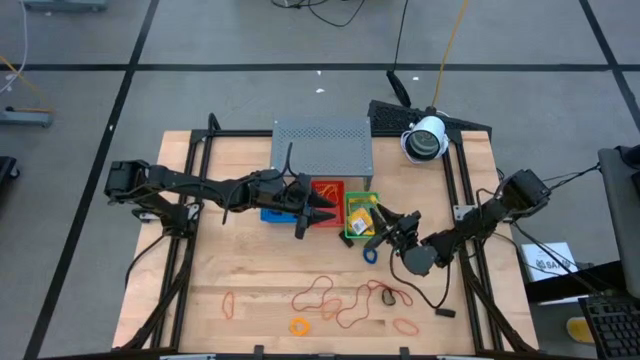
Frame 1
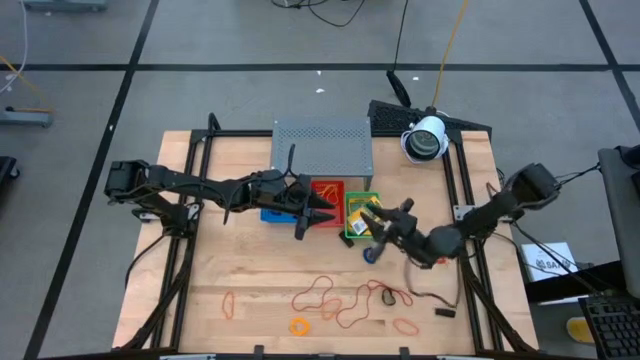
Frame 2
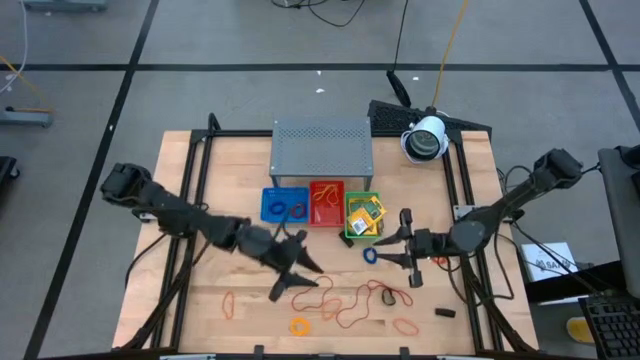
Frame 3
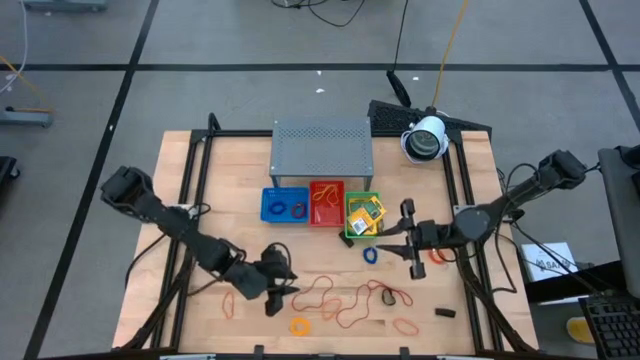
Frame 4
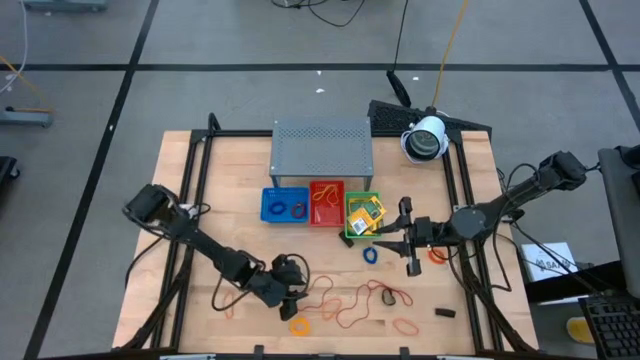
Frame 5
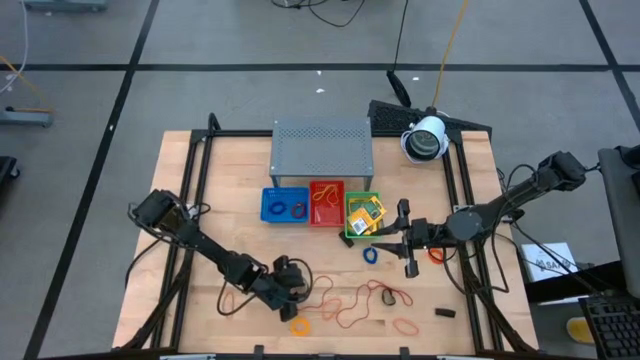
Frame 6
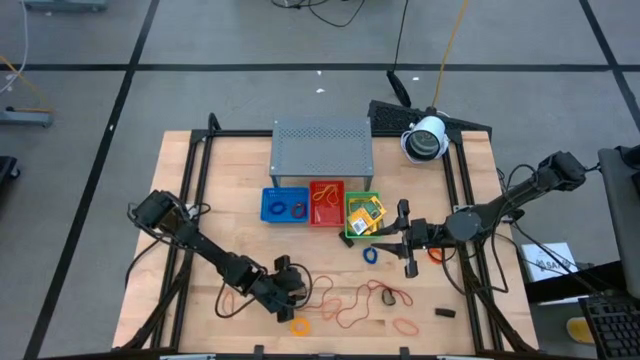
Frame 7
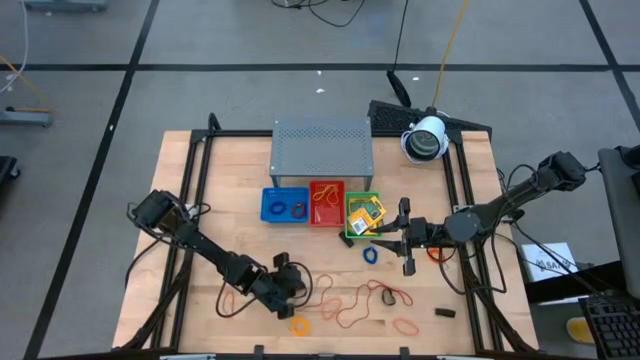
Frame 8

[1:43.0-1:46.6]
Task: Pick & Place Office Desk Supplies
Put the red rubber band into the red bin

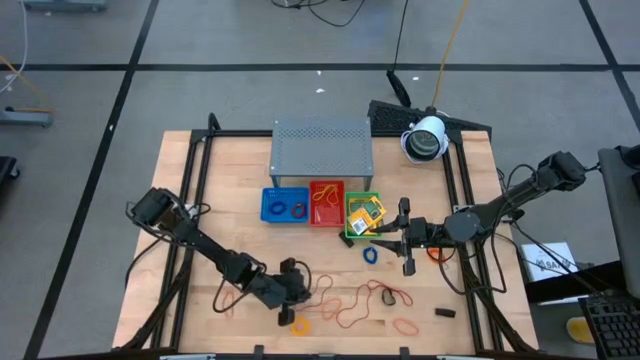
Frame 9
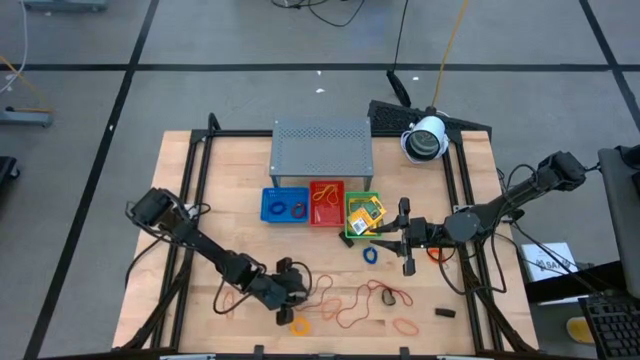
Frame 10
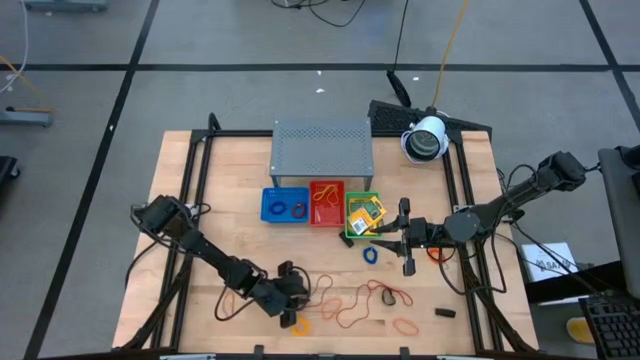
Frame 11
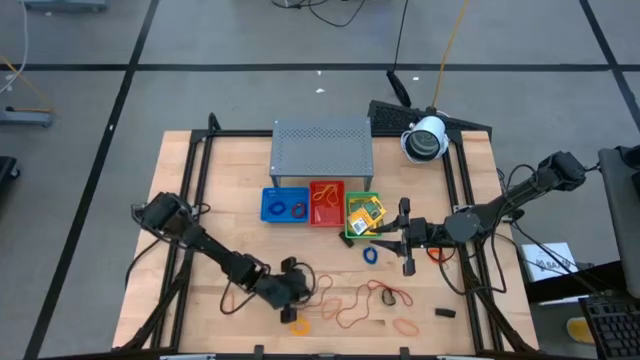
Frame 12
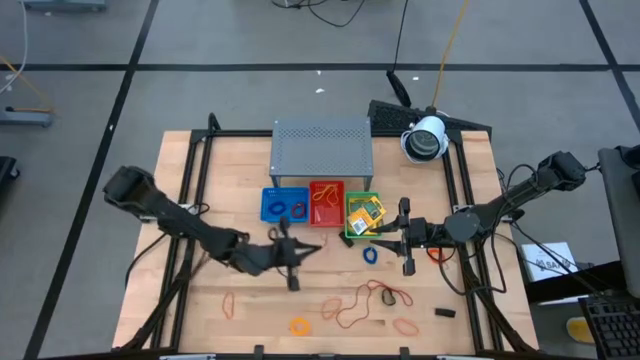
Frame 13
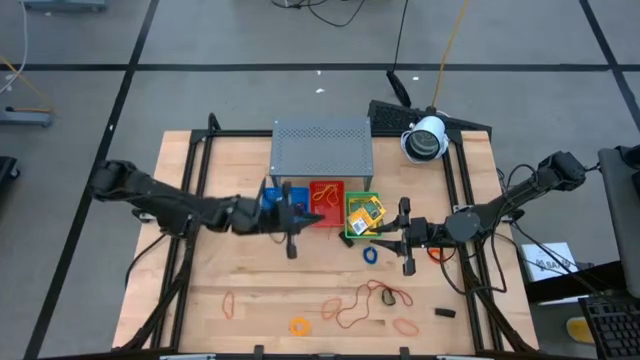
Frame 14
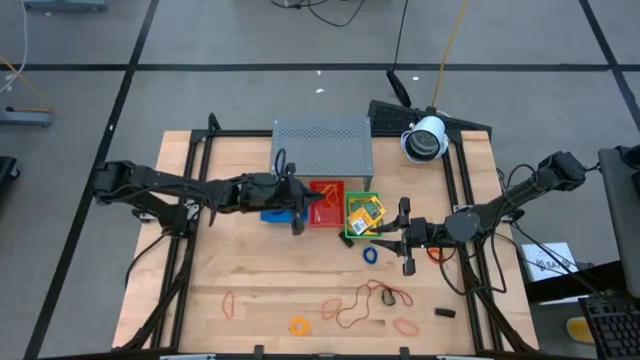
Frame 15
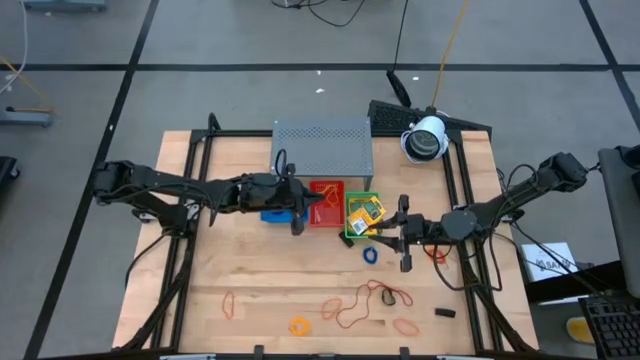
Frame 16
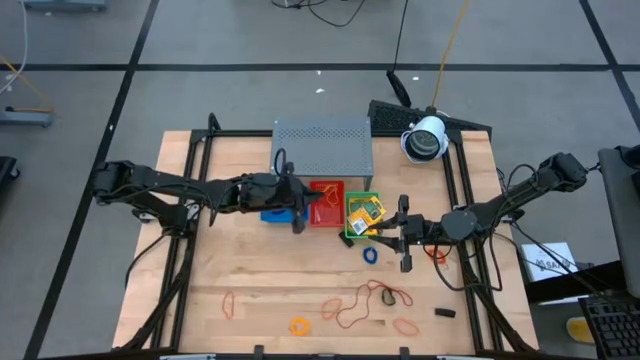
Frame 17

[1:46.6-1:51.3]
Put the red rubber band into the red bin

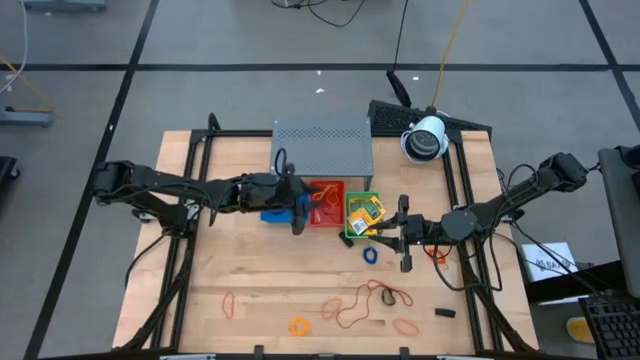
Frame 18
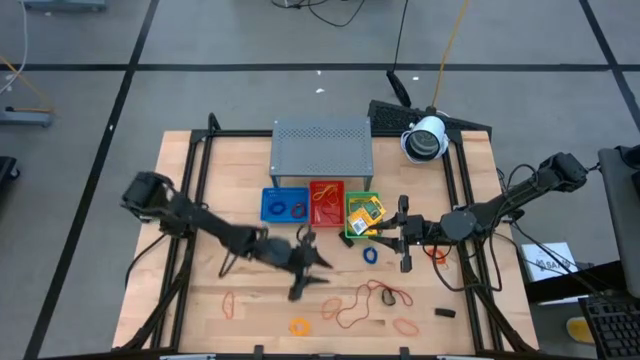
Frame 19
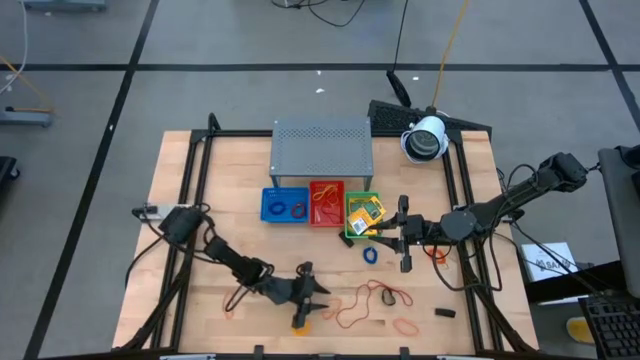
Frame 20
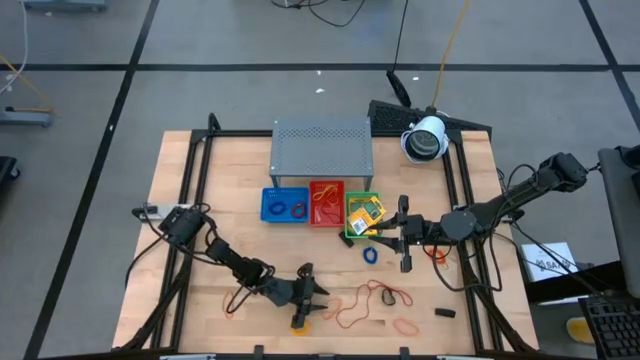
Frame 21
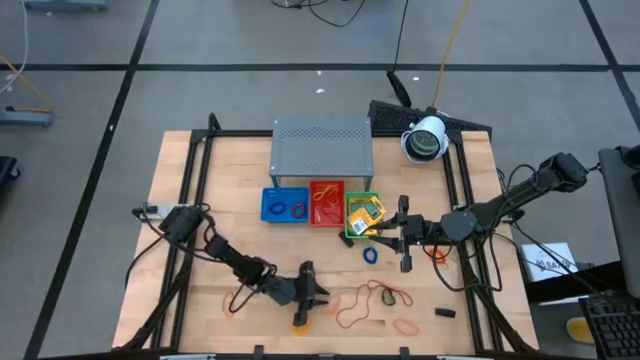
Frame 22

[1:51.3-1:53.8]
Put the orange rubber band into the red bin

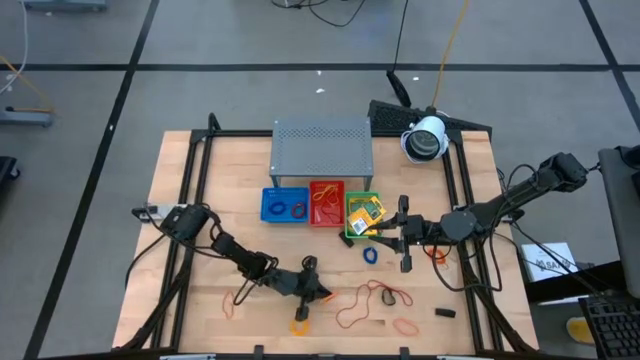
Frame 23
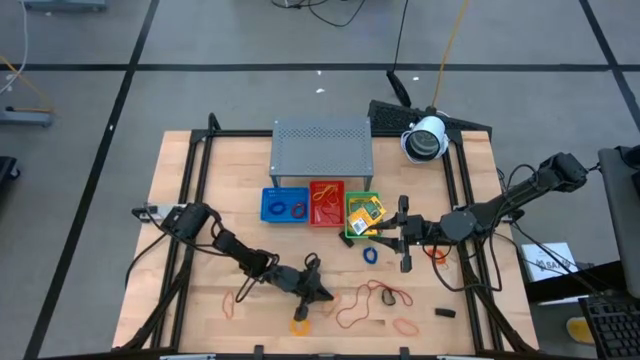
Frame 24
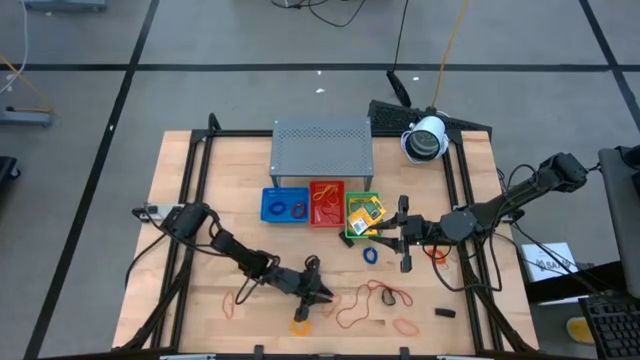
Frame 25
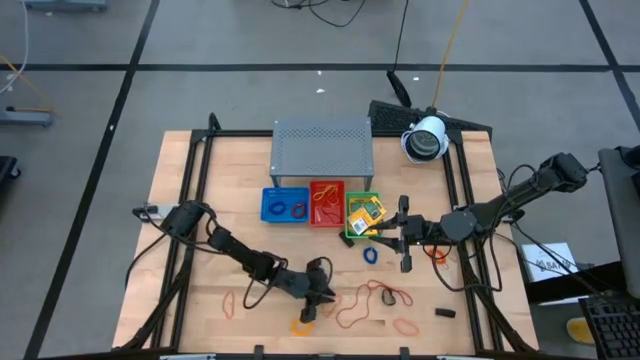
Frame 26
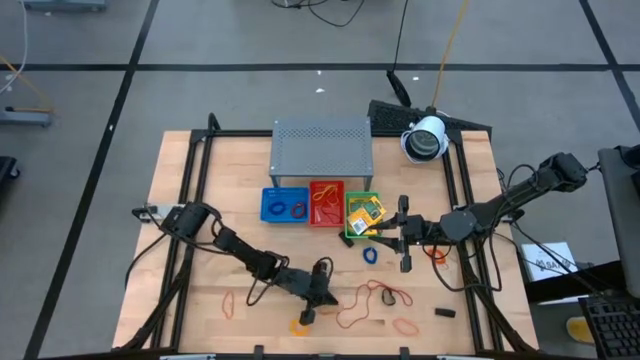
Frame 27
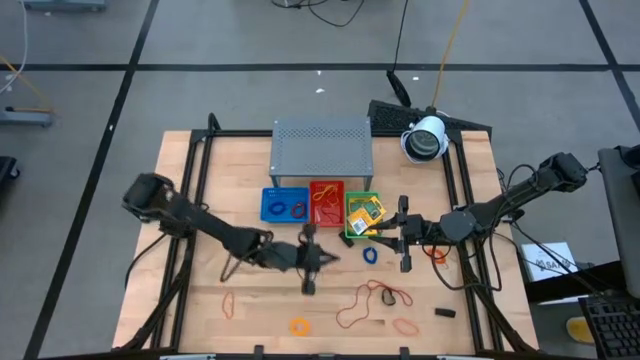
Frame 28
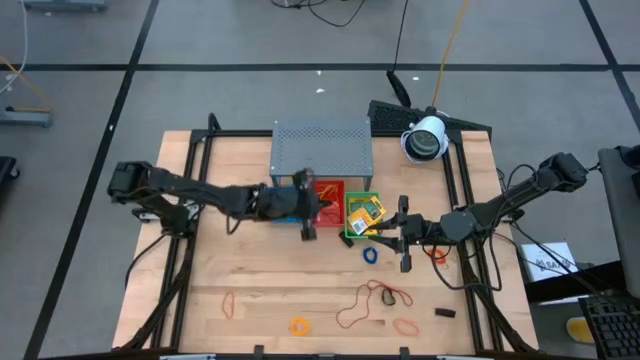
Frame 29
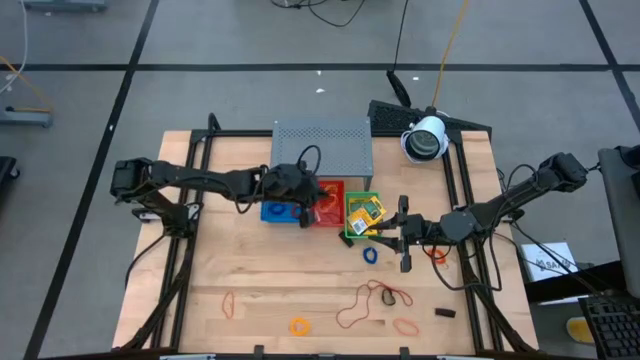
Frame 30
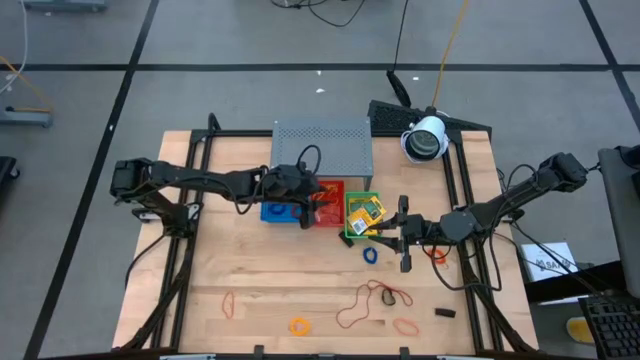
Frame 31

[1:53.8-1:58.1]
Put the orange rubber band into the red bin

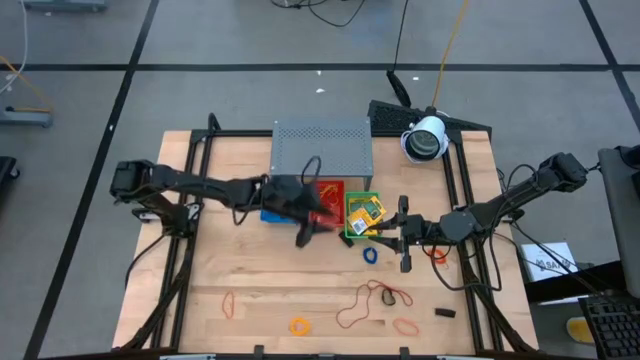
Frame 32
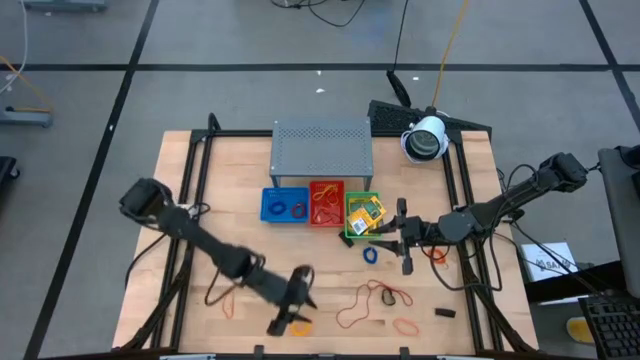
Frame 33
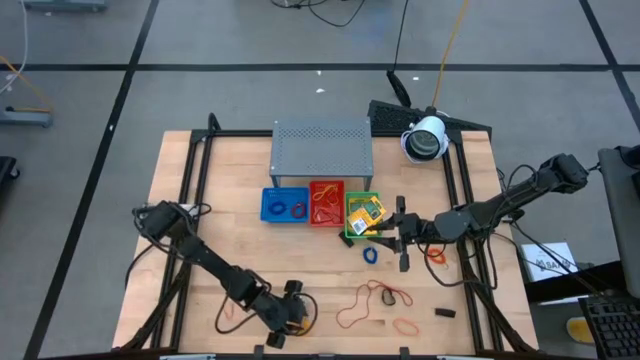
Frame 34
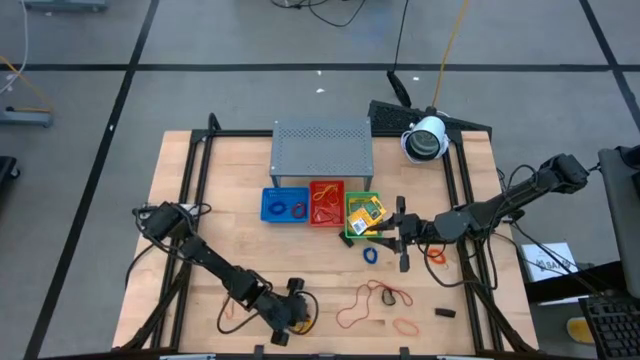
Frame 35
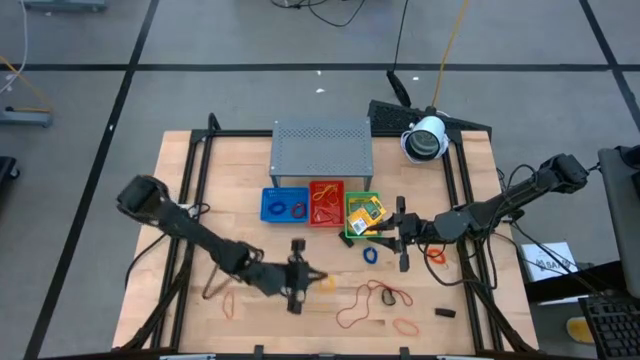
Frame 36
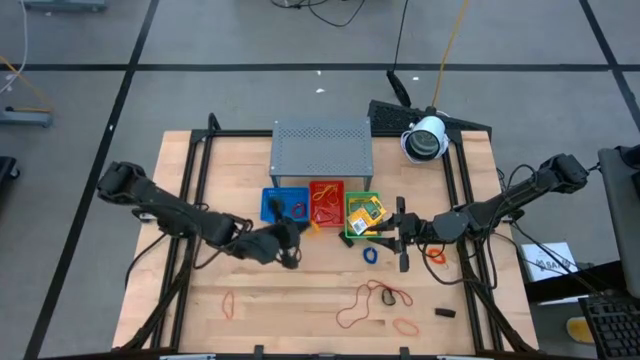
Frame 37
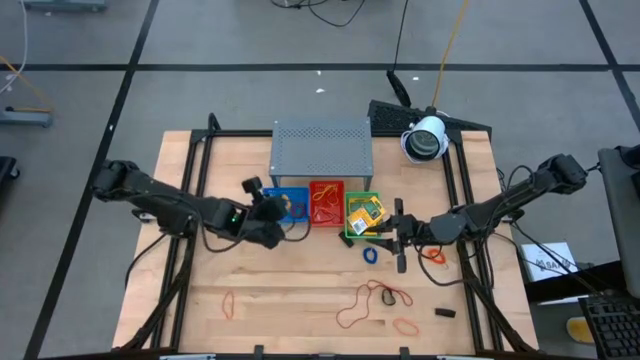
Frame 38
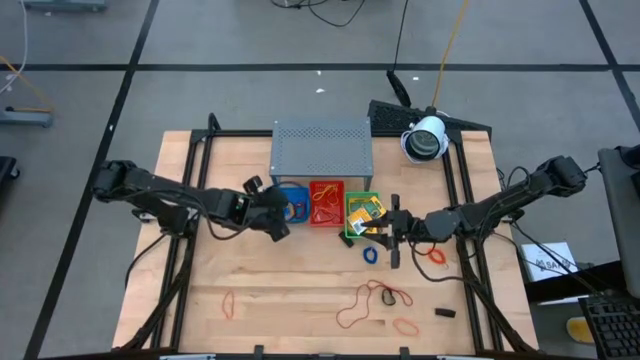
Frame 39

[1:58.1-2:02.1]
Put the orange Spring keychain into the blue bin

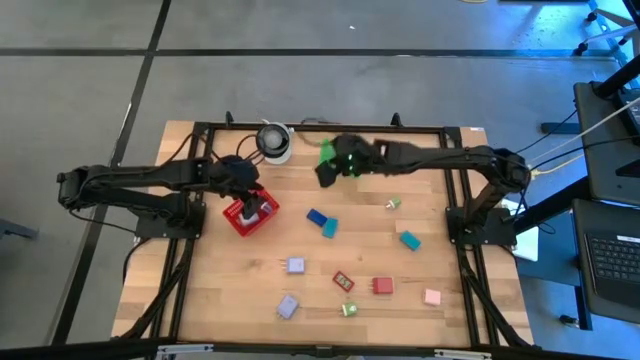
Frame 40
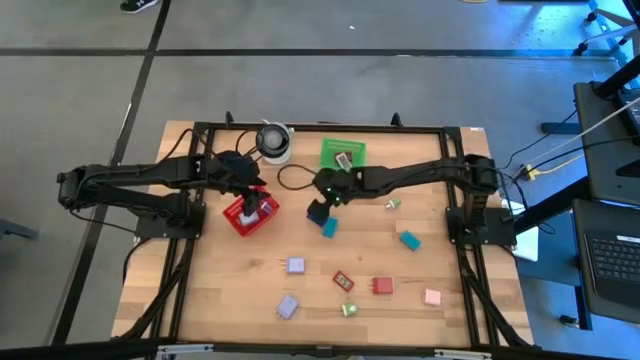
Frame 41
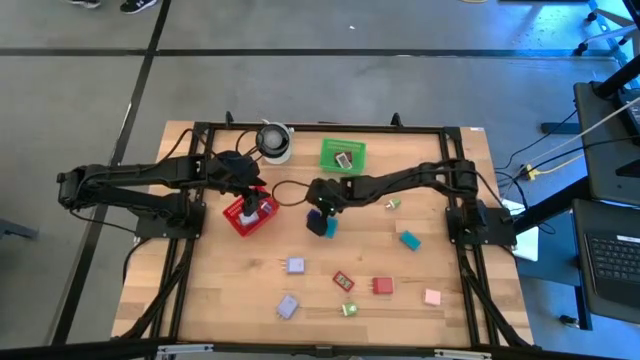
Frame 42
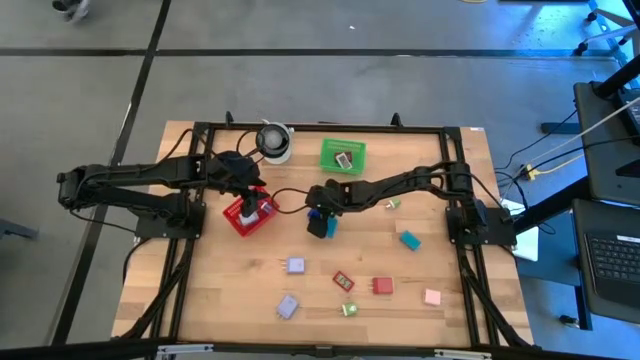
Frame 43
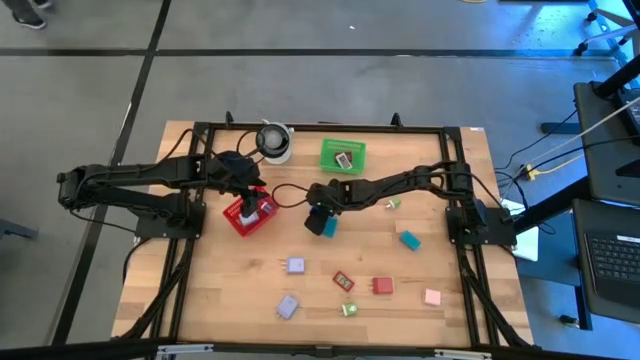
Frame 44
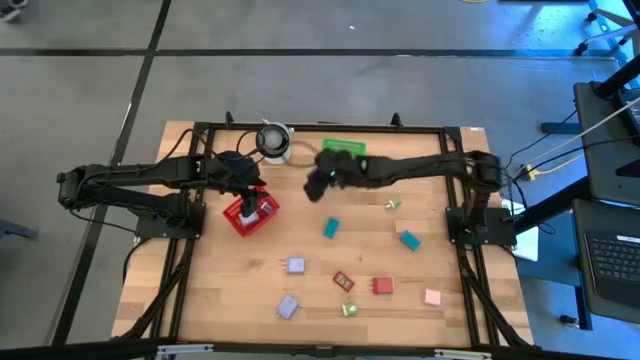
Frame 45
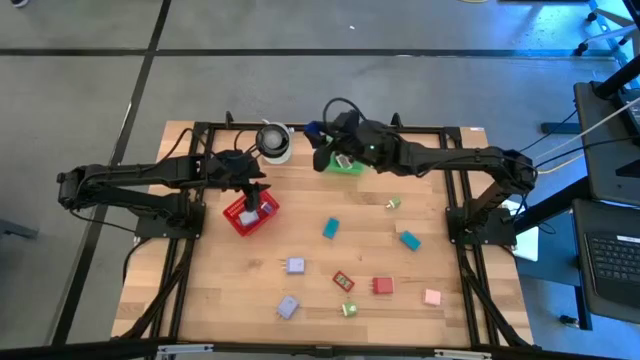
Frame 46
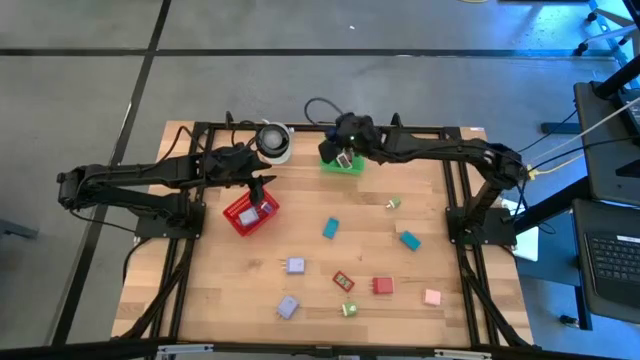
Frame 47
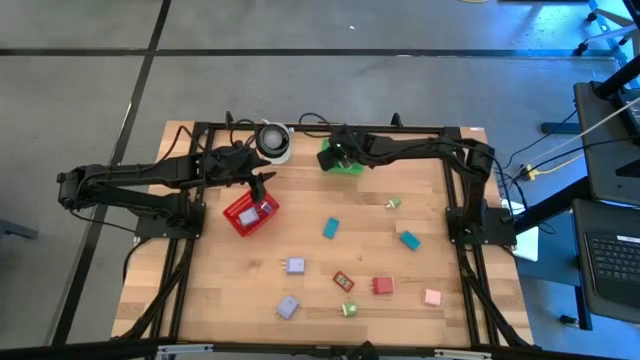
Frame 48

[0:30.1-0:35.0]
Task: Pick & Place Office items
Put the blue digital clock into the green bin
